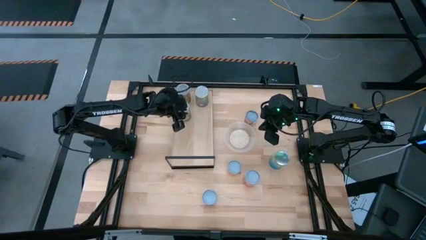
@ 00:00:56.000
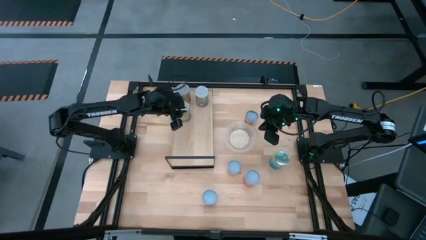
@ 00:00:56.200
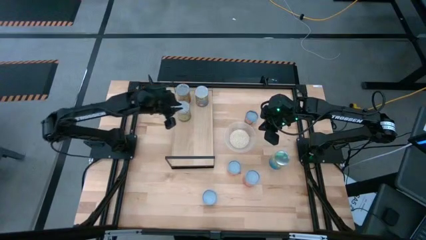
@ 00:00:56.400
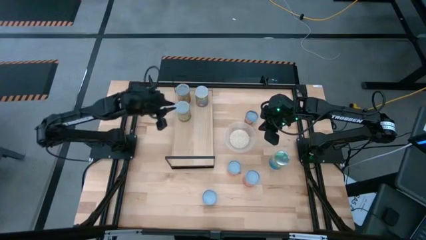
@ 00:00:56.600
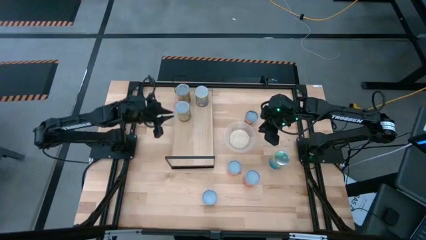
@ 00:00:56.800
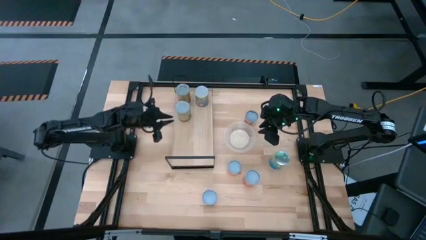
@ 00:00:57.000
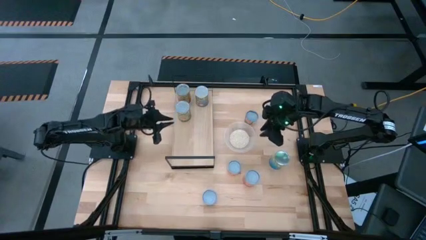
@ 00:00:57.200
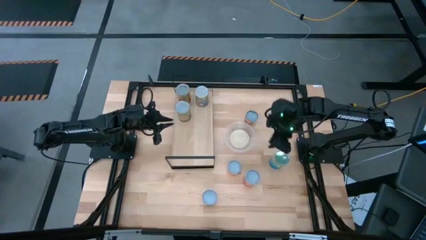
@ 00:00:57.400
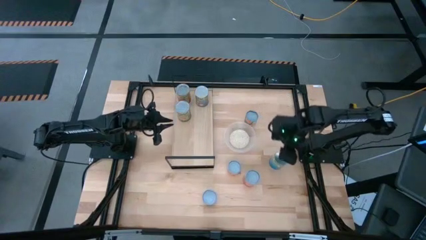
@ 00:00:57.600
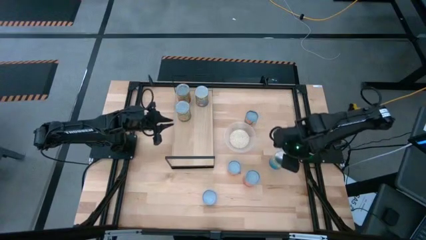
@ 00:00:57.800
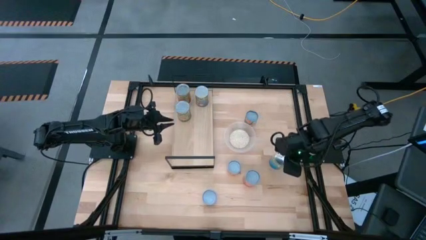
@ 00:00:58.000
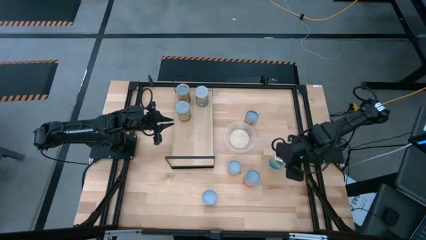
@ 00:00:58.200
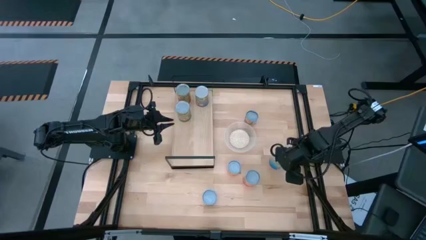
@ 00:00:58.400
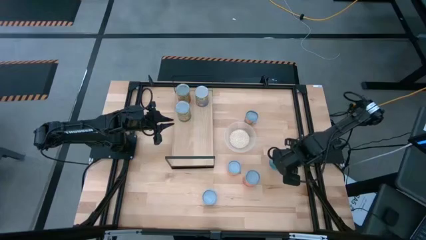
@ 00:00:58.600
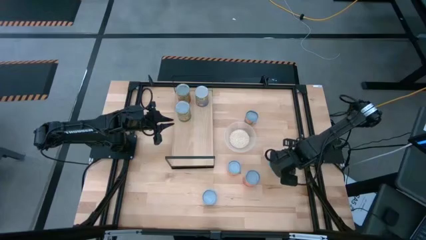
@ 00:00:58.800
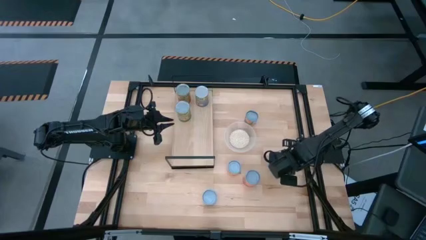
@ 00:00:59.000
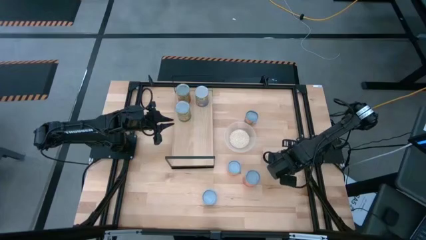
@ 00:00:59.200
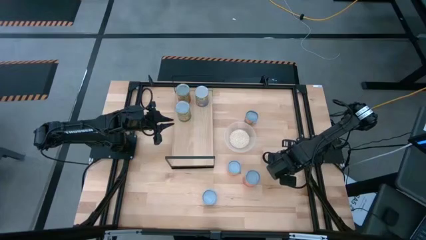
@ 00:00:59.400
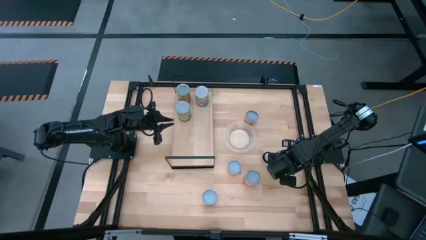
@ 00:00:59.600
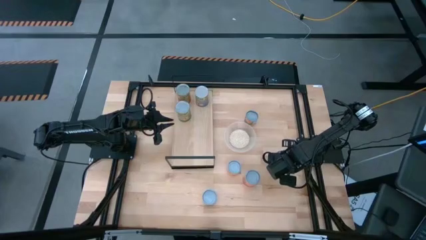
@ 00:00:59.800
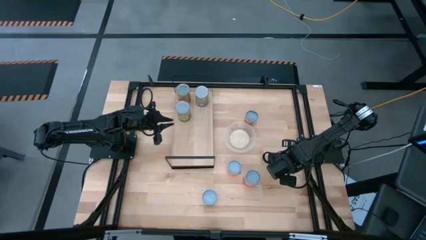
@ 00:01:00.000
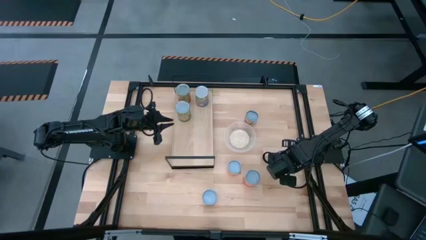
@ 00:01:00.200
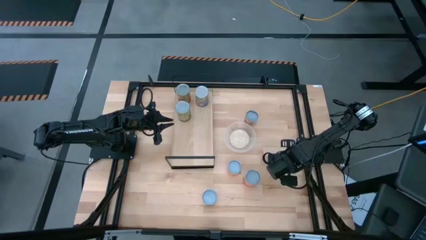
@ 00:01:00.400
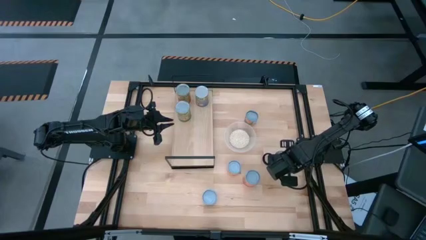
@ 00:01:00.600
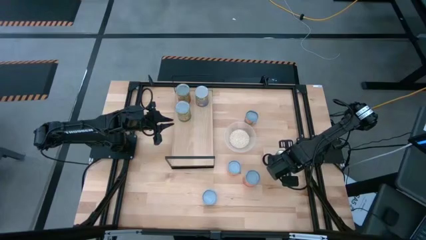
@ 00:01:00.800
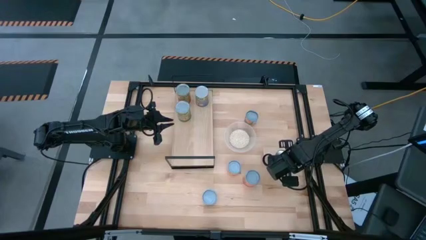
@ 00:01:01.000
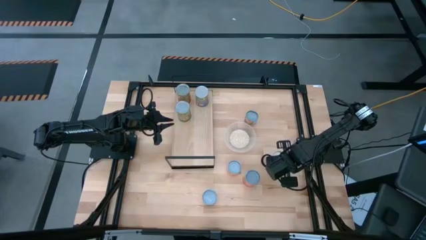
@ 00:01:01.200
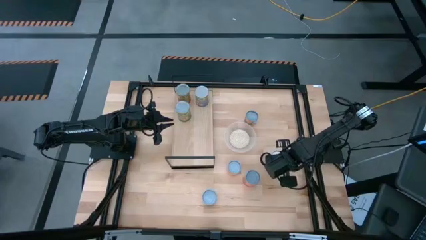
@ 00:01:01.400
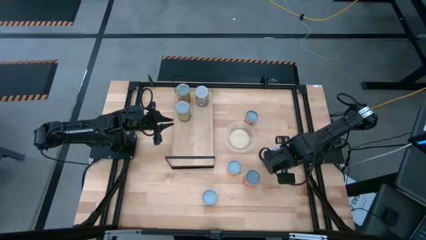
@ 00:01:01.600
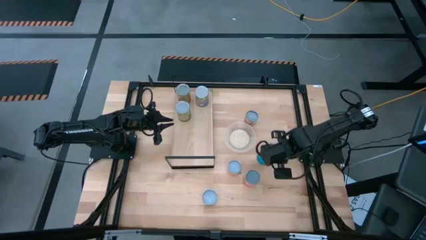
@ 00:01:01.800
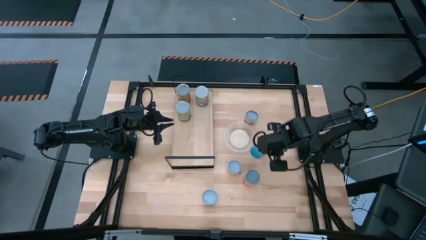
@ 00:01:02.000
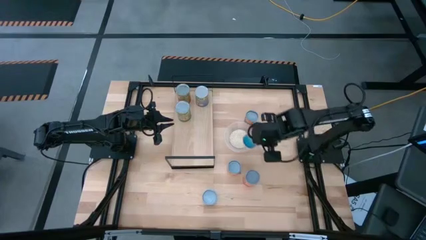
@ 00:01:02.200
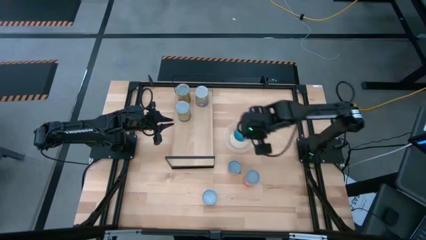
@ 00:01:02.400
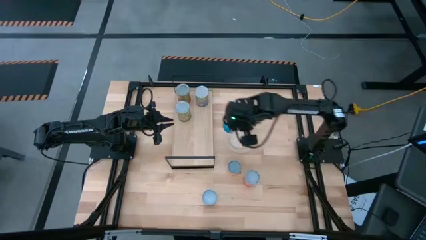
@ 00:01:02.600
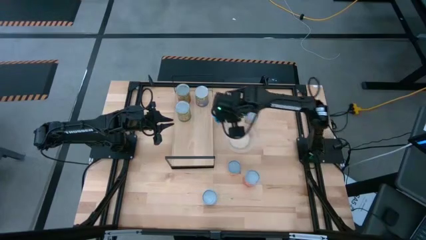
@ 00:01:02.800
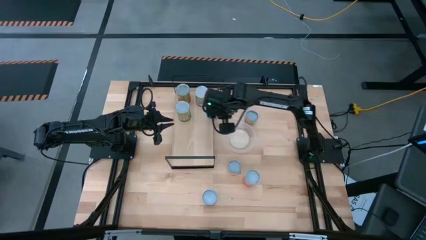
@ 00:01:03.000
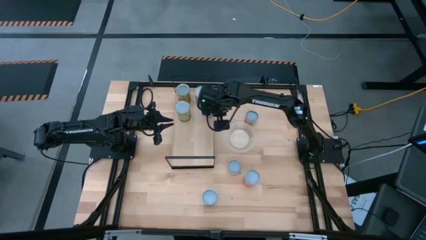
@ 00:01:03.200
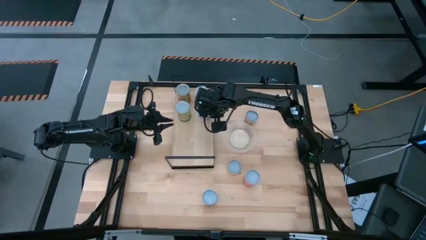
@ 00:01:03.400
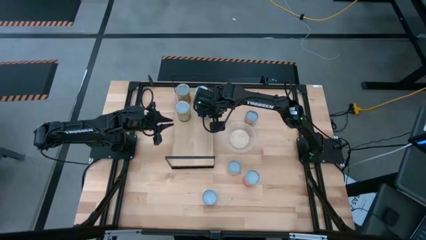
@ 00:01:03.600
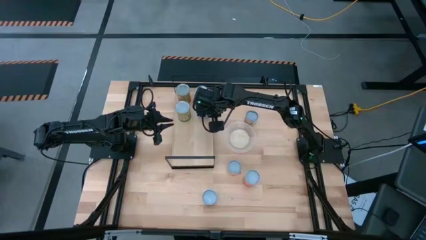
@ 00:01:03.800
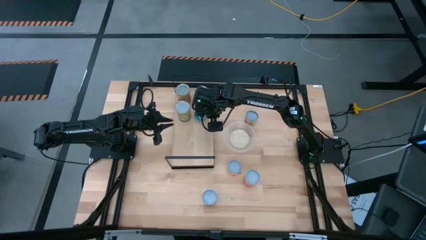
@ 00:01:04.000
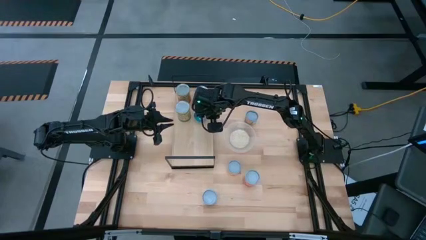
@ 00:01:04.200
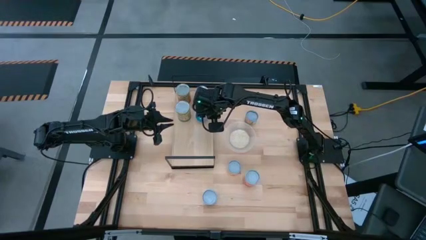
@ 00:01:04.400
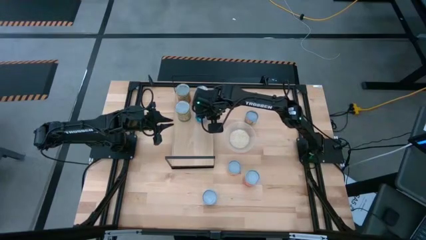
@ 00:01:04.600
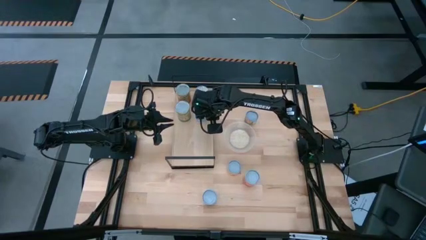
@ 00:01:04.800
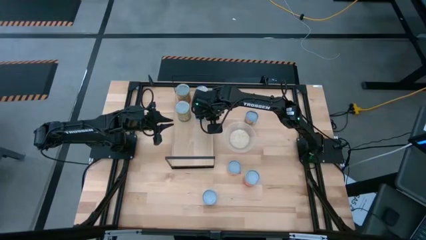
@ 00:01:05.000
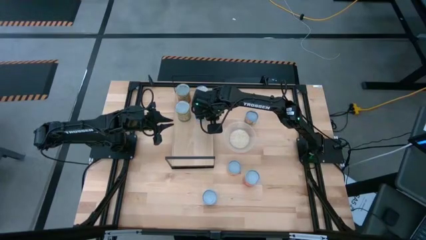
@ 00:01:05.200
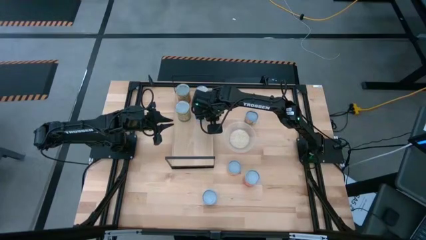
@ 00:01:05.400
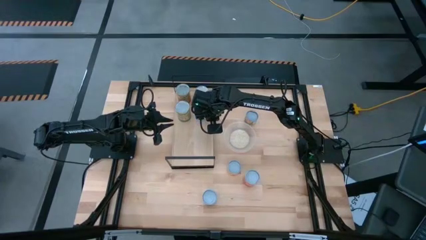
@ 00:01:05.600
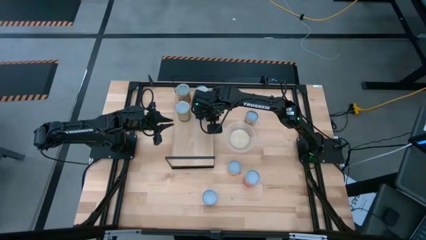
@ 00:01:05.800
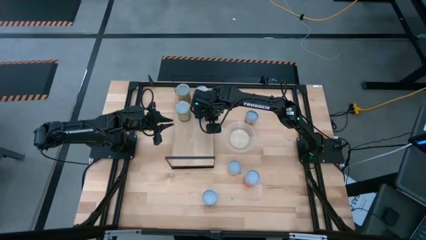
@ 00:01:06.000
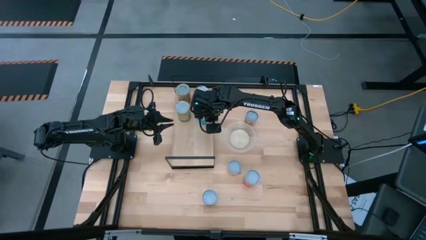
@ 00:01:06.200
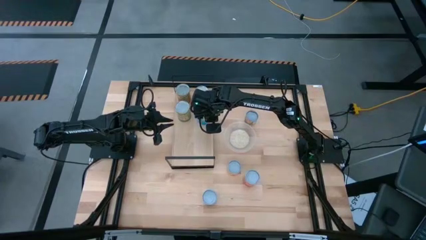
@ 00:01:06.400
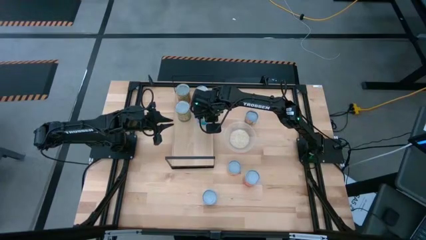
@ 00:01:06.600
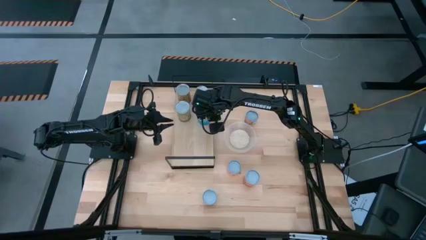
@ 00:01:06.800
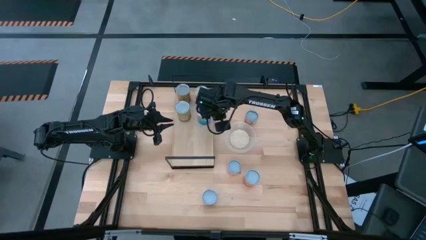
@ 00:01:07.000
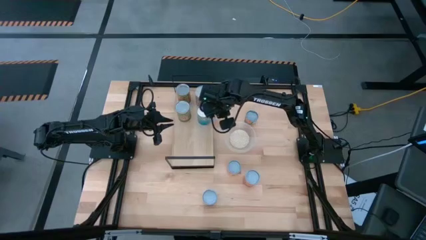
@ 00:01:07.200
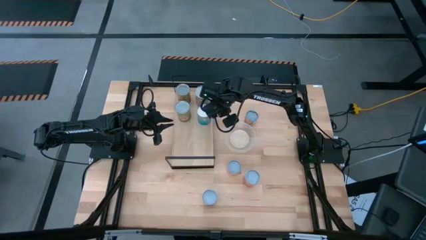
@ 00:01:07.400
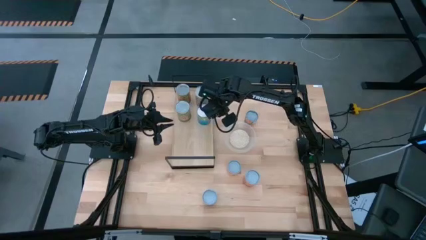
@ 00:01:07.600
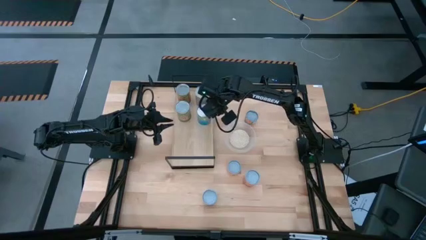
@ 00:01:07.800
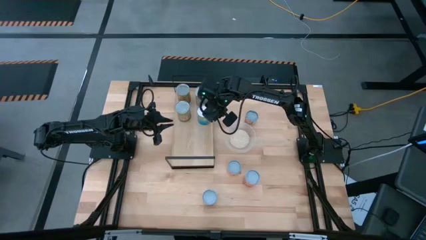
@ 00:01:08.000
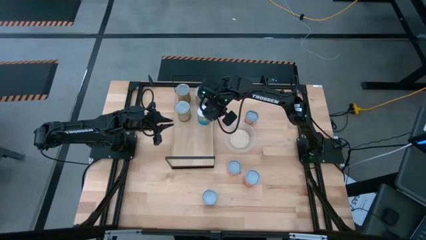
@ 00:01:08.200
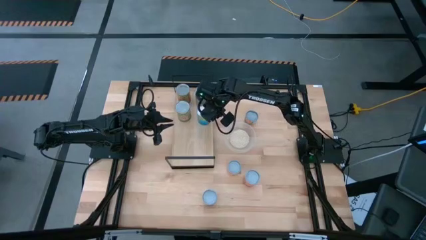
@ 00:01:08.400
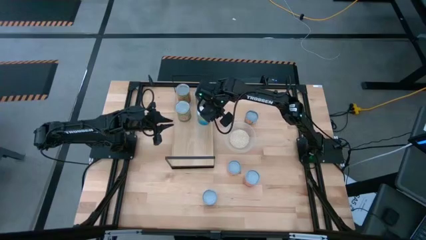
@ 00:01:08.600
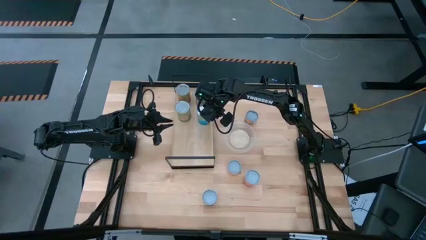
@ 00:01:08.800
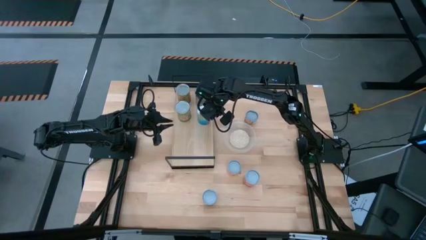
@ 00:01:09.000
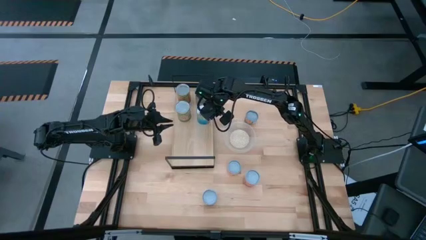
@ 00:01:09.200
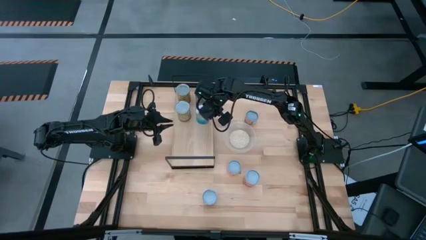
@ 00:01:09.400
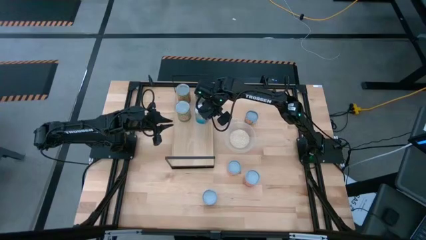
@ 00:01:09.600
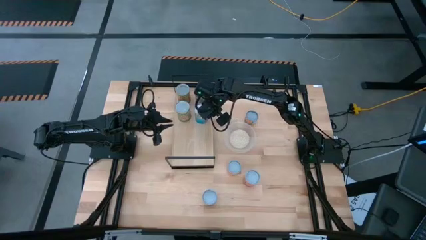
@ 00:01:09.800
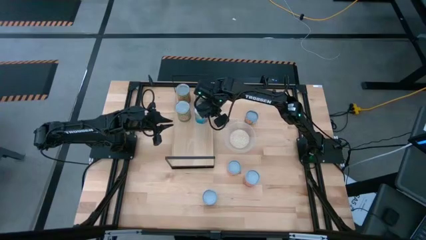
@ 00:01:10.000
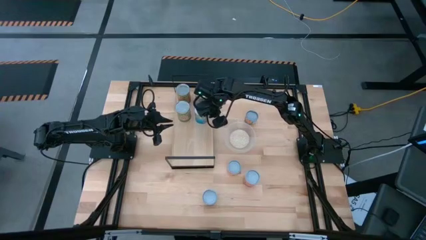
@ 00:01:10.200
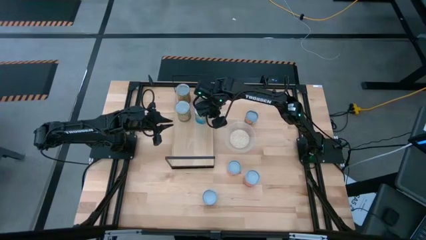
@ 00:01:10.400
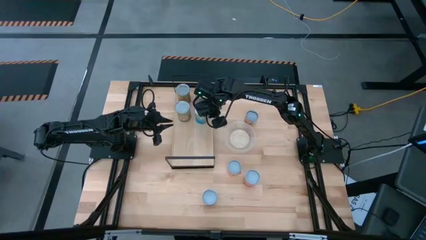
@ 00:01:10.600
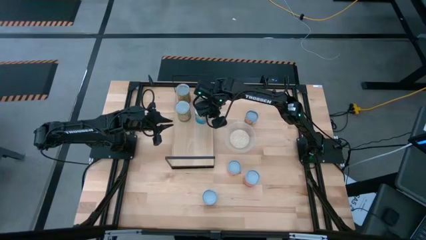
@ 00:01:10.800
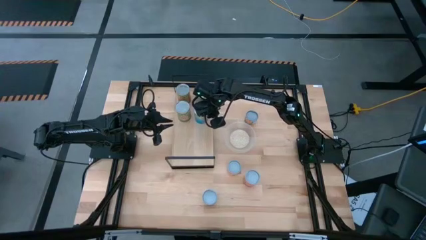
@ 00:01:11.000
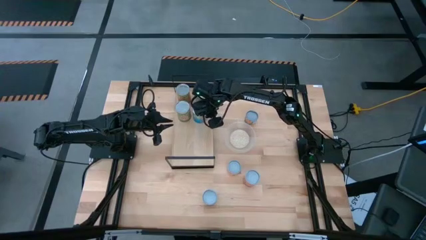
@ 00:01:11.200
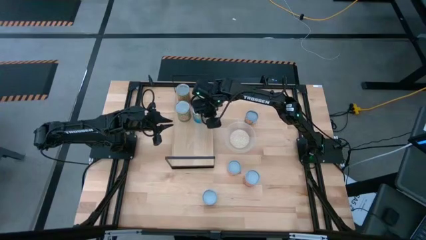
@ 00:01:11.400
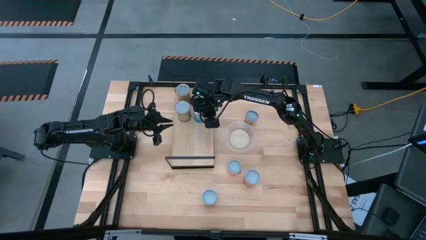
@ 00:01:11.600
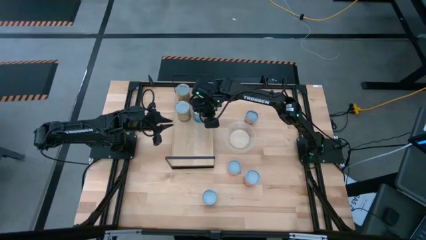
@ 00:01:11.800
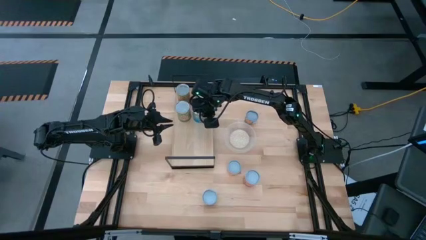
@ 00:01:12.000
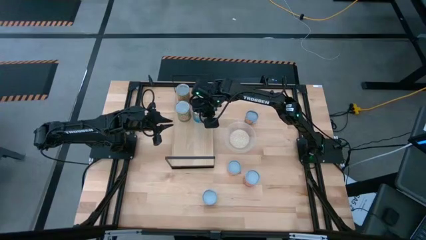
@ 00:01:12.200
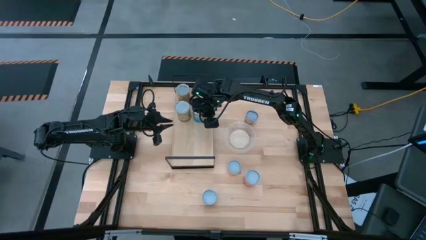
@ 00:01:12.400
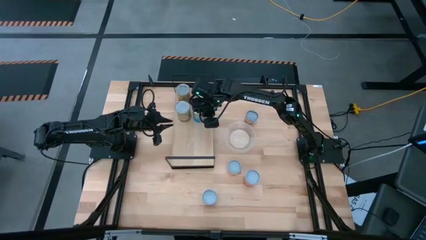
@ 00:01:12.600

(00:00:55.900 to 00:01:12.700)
Task: Pick and place cans onto a shelf
Put the large canned cherries on the shelf
